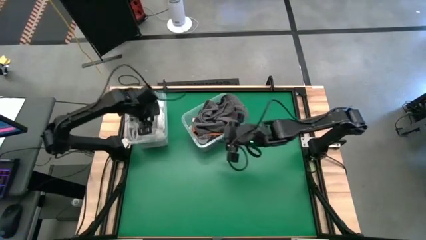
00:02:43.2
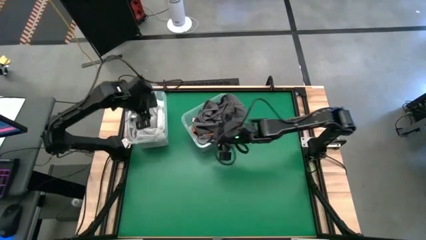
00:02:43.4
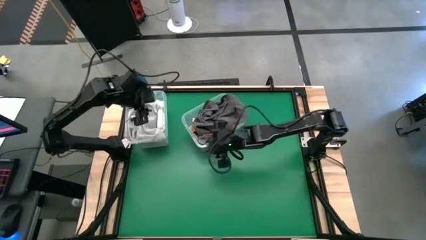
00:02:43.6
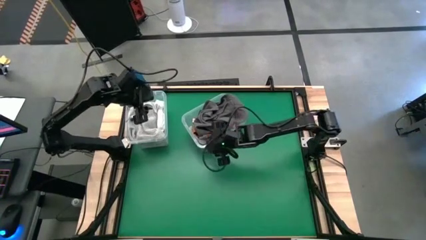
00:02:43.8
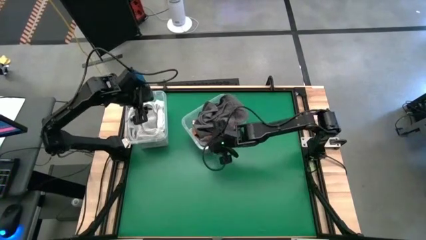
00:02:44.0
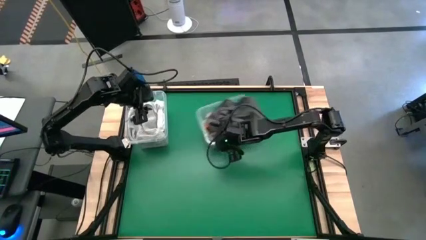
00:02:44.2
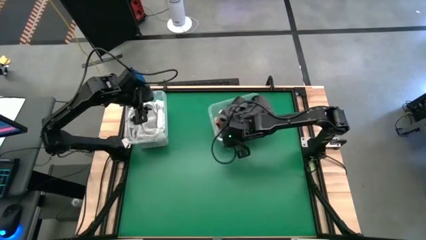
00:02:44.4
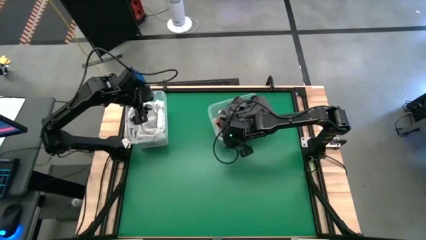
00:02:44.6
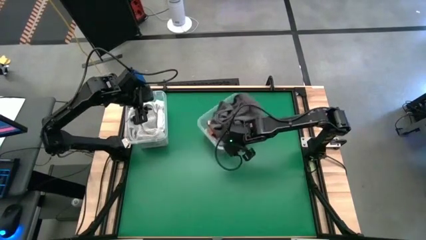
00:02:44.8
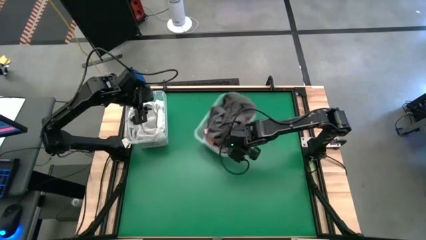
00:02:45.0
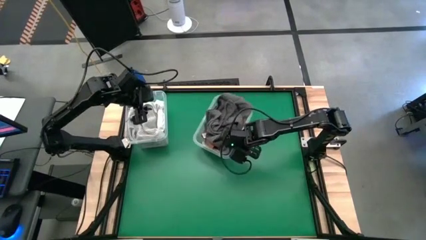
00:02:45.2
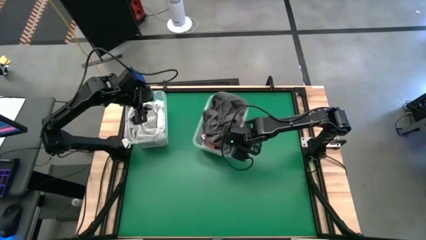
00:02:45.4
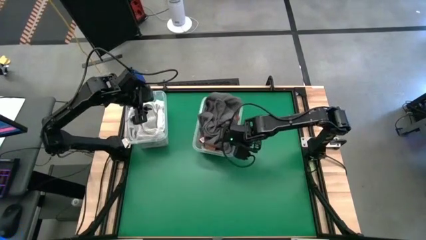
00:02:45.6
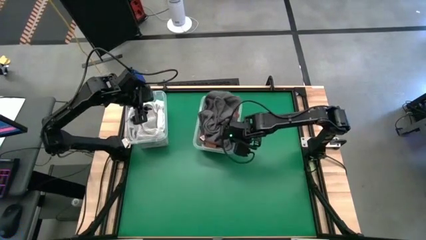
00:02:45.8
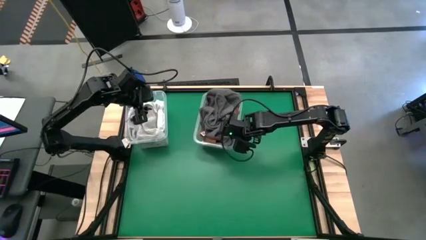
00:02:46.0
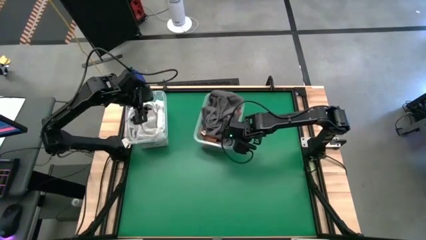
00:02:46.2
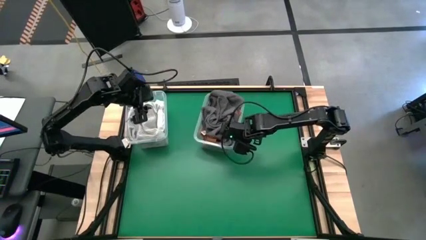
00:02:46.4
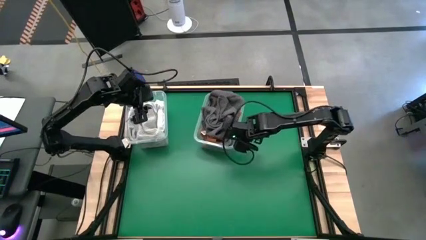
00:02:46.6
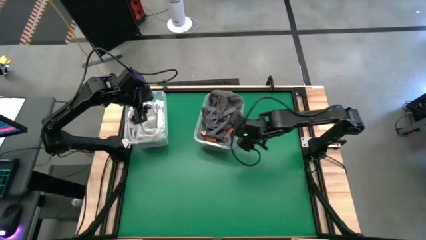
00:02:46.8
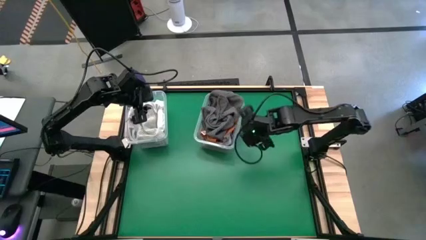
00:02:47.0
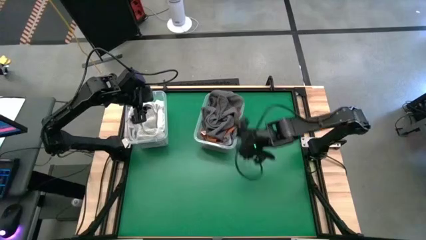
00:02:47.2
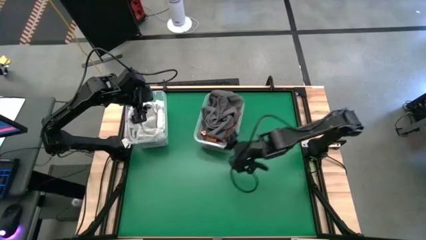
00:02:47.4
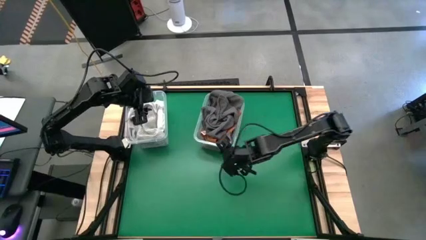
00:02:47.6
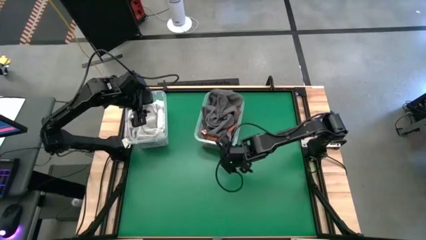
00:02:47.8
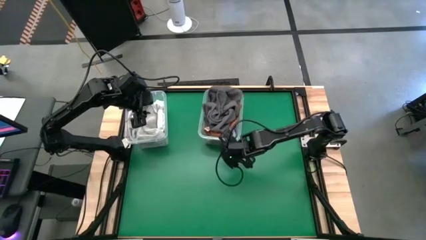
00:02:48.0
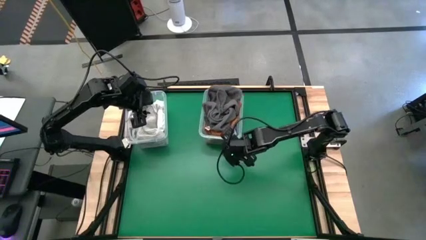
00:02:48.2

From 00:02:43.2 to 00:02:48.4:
Task: Sort towels by color in basket
Adjust the right transparent bin on the table

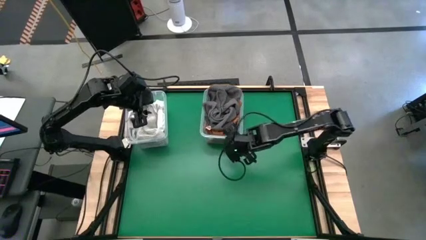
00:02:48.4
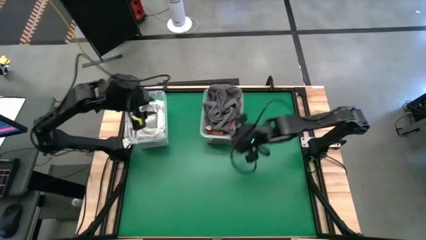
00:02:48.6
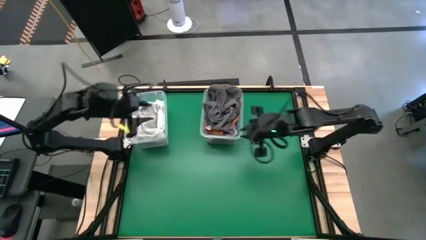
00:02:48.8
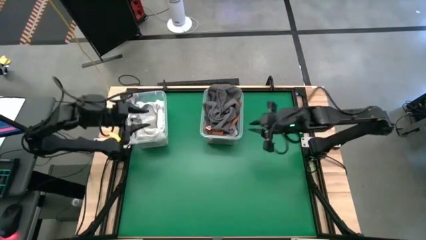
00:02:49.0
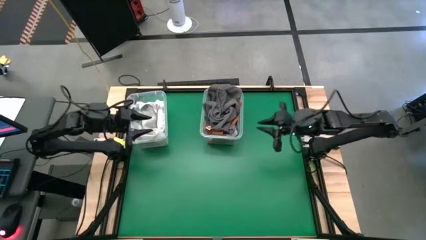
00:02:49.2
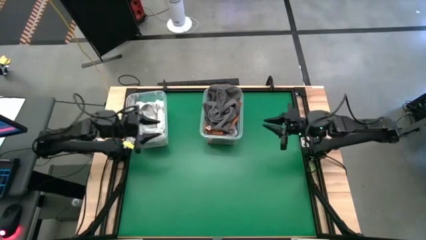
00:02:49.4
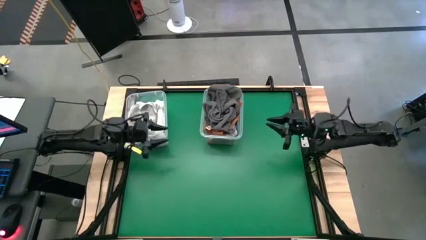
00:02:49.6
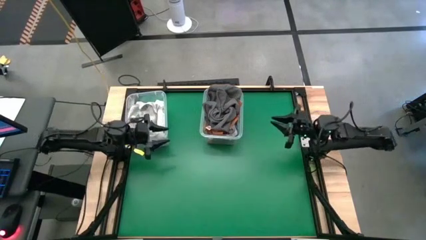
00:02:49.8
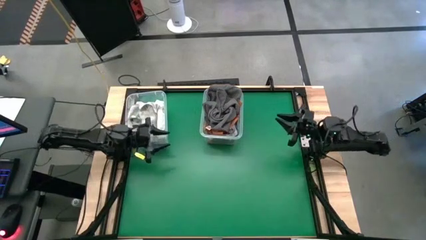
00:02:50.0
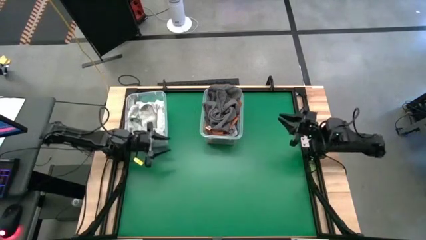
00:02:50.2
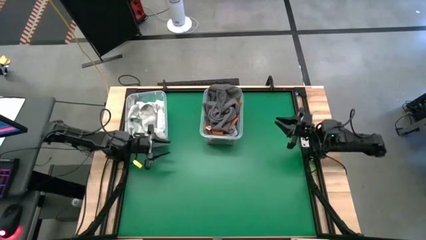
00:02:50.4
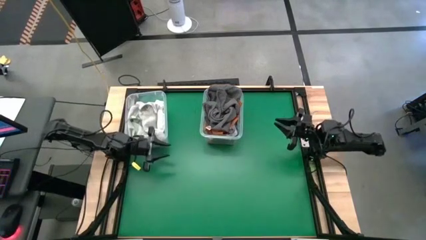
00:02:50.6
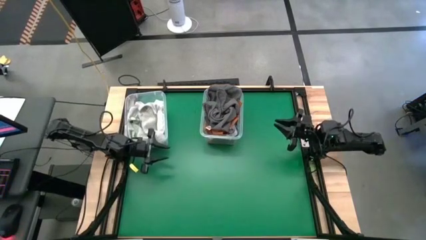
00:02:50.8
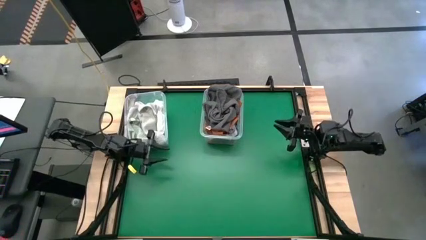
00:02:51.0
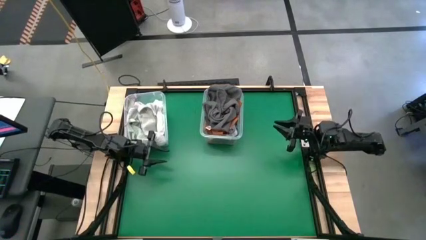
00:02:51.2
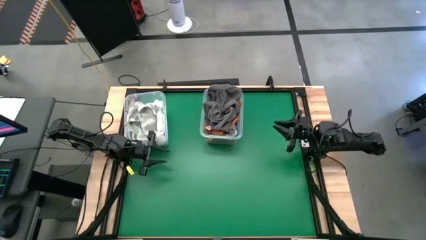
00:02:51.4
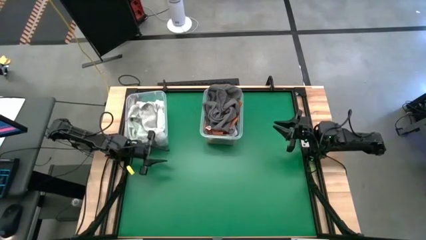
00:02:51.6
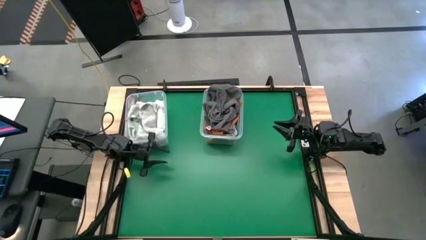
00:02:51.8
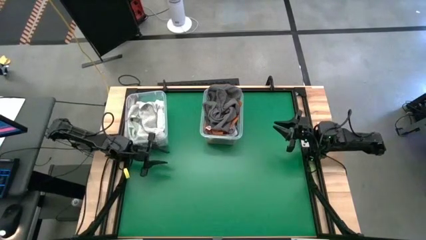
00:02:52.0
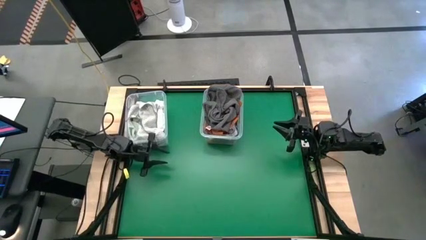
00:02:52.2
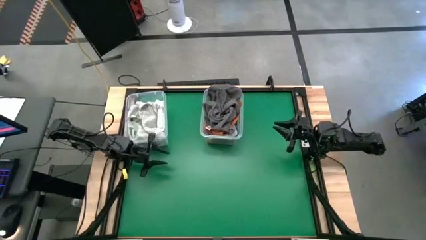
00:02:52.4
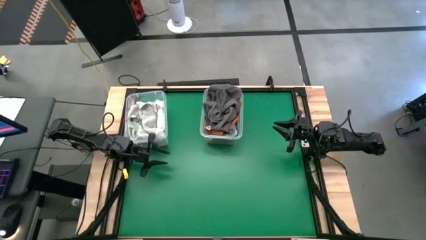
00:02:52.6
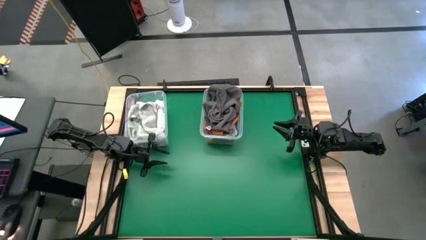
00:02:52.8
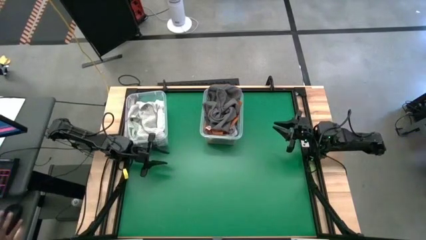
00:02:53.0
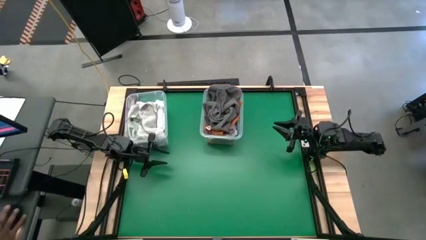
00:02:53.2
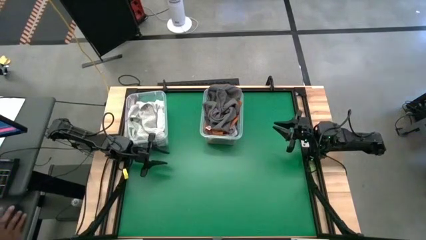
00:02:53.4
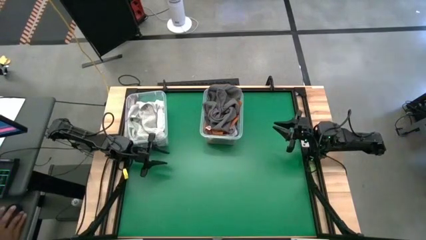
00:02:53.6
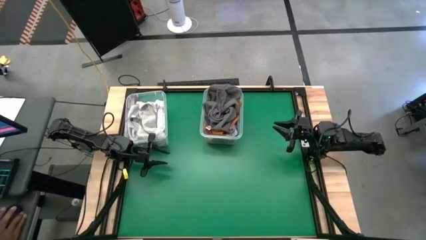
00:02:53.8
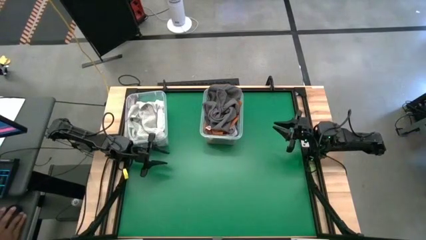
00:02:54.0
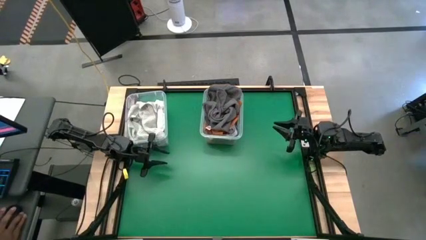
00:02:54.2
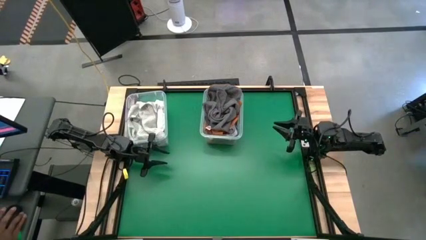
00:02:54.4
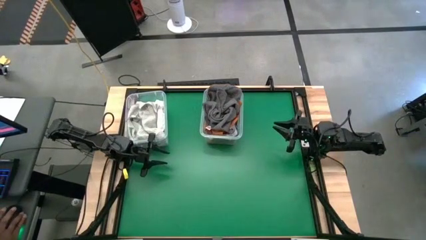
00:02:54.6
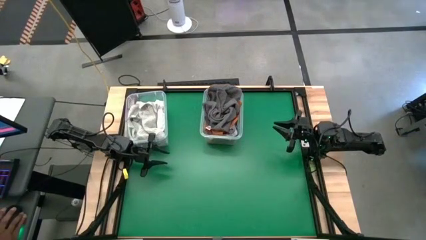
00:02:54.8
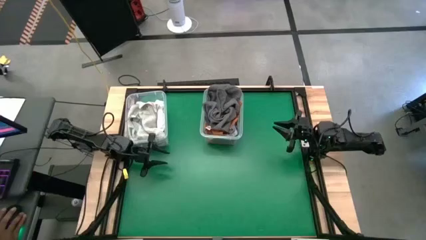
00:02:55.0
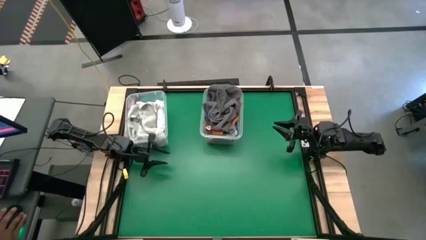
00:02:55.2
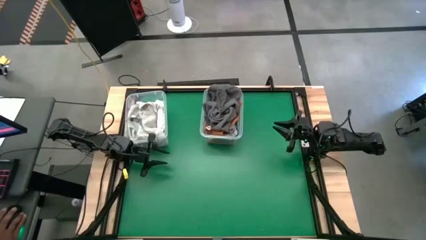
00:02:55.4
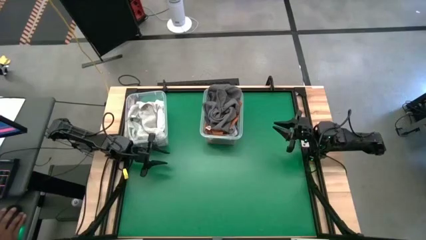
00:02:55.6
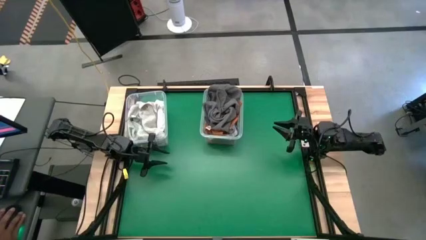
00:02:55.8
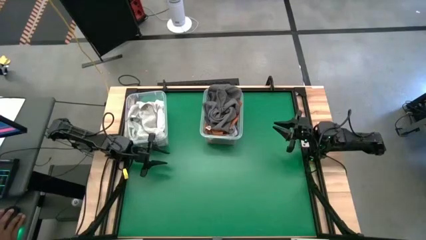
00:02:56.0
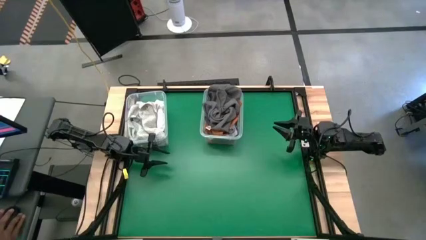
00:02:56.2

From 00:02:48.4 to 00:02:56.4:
Return to Home Position

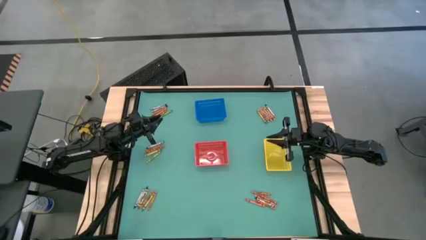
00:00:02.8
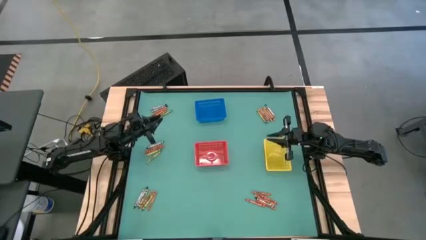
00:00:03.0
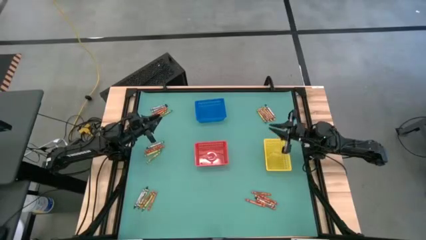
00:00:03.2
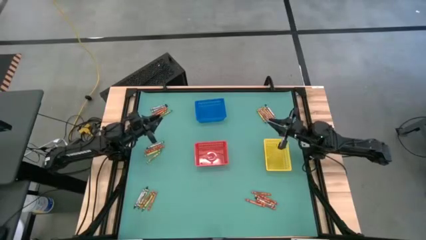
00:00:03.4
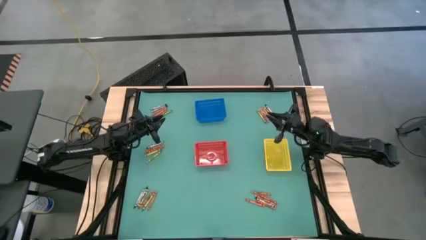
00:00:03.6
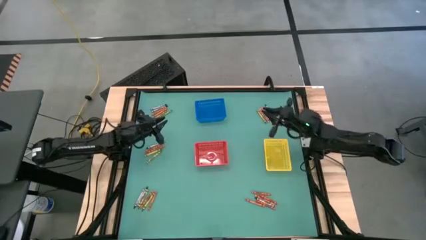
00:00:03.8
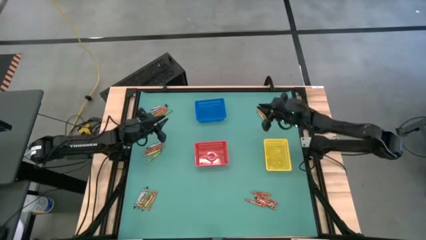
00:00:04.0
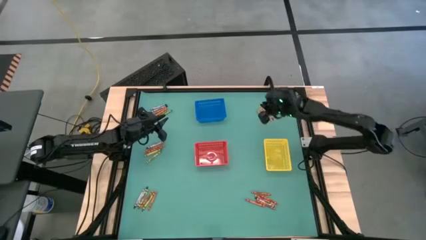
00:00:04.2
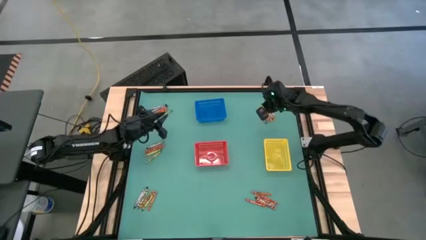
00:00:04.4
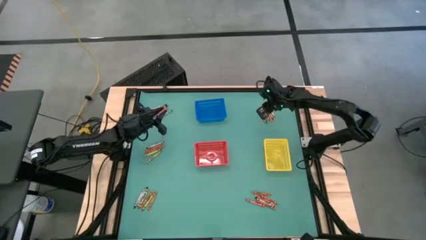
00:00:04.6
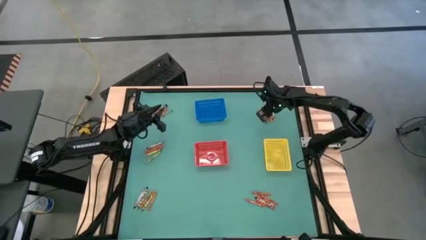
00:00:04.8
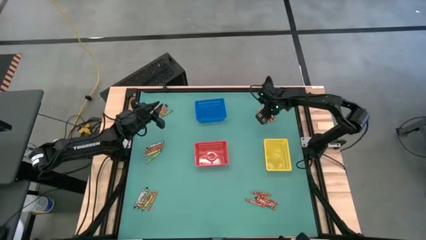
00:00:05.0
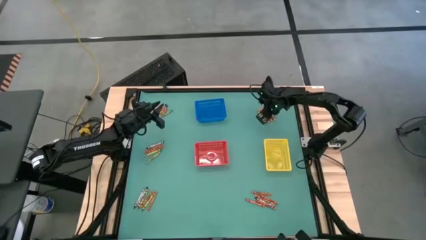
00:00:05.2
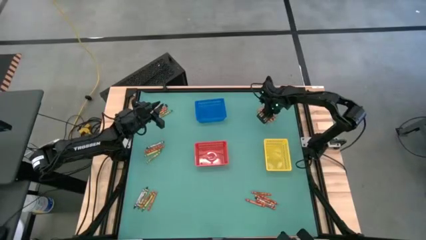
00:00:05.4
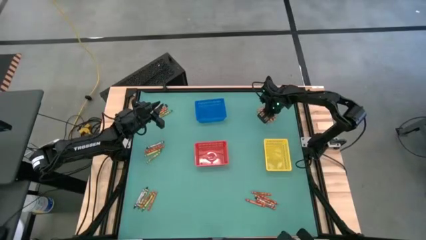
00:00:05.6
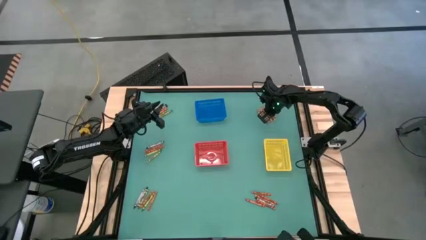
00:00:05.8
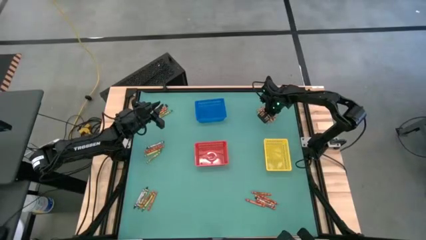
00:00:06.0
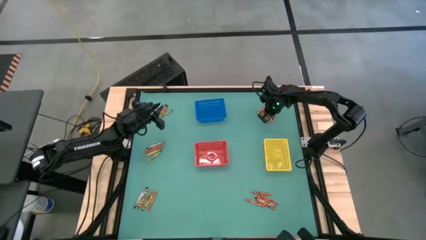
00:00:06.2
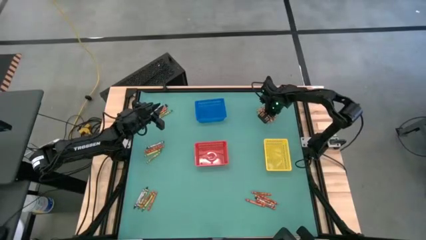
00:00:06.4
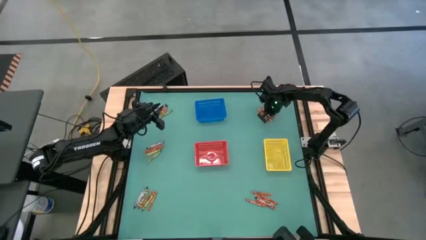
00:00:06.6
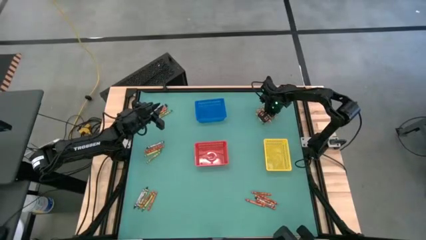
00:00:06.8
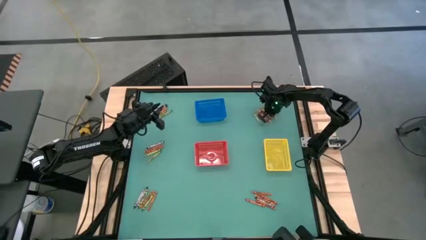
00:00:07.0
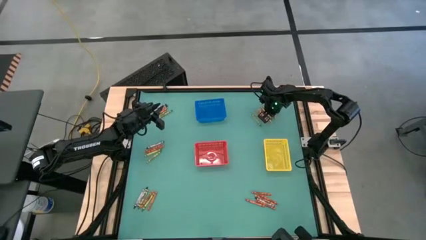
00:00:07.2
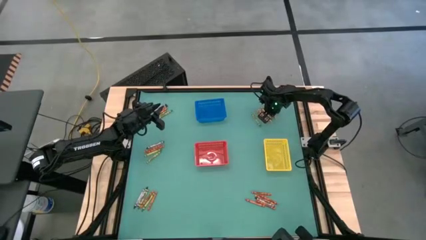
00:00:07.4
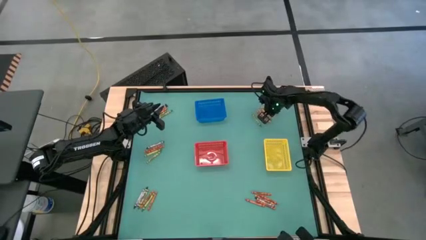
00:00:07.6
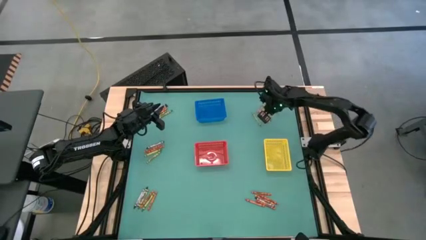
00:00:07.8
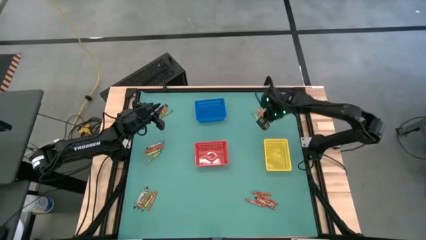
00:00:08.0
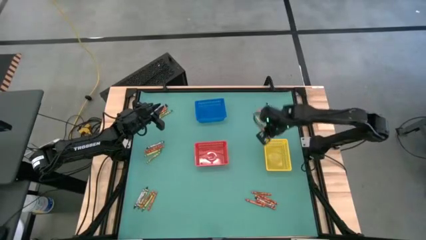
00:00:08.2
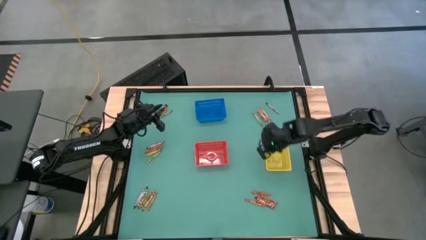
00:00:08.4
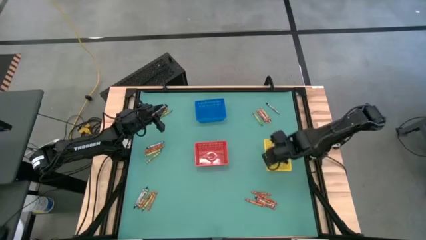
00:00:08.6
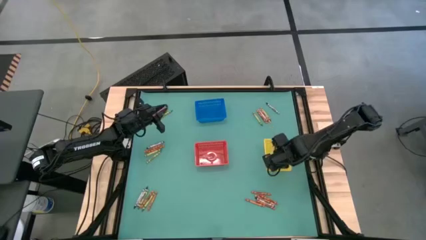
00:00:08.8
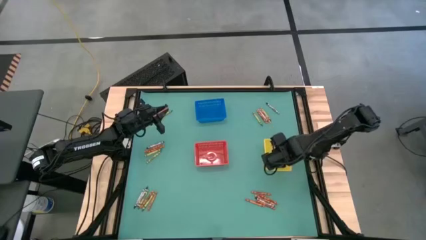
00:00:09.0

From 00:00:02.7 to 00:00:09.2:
Task: Sort crayons
Put the orange crayon into the yellow bin
